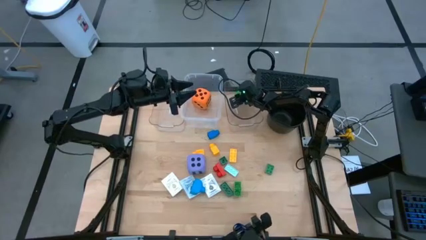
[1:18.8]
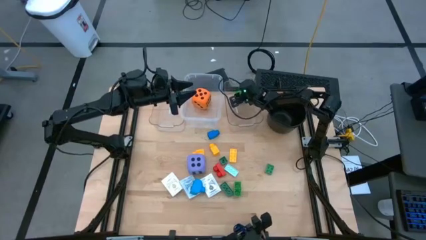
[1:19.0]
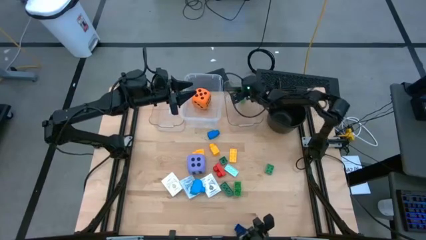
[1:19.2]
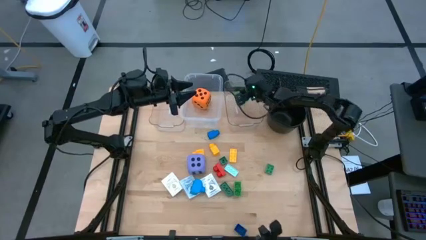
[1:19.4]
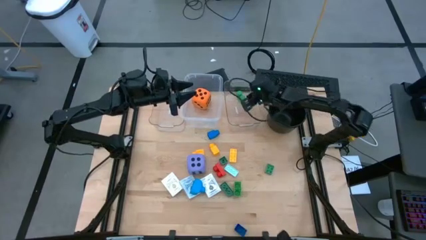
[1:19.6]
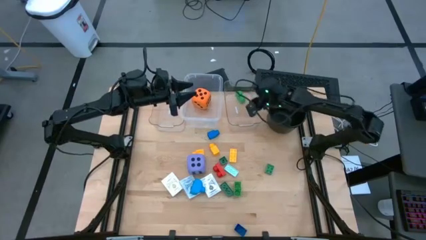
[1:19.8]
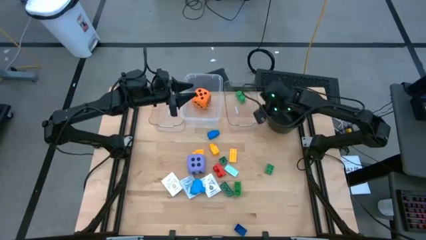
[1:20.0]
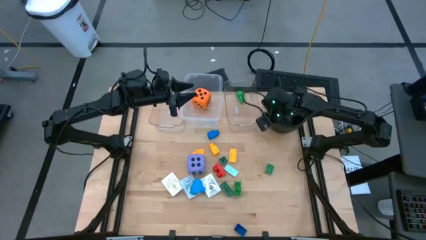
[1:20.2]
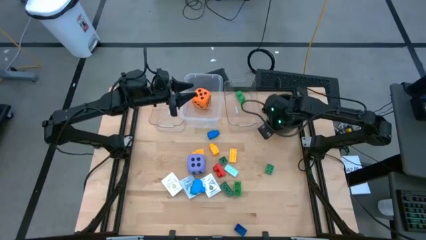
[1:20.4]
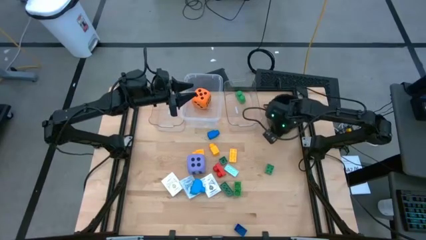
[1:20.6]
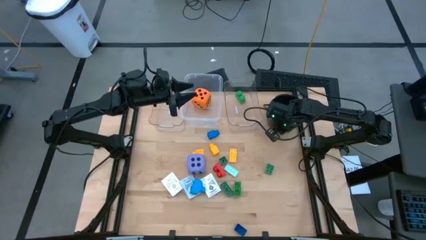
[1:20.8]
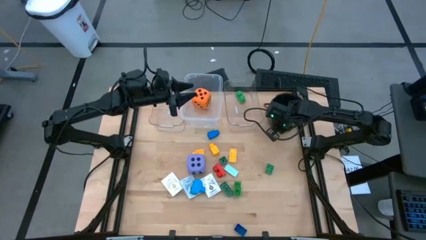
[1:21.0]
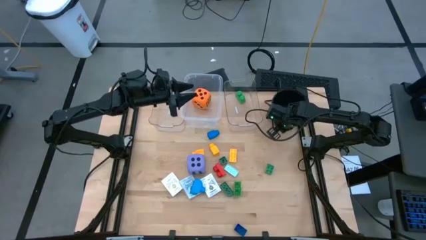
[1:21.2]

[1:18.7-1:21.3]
Task: Pick & Place Toys
Adjust the black bucket

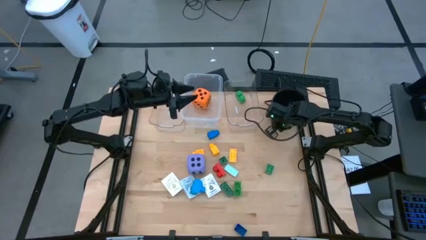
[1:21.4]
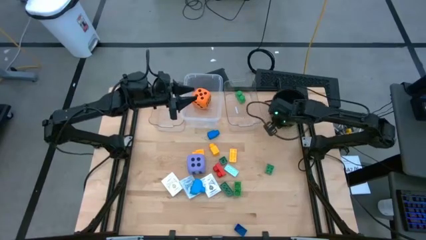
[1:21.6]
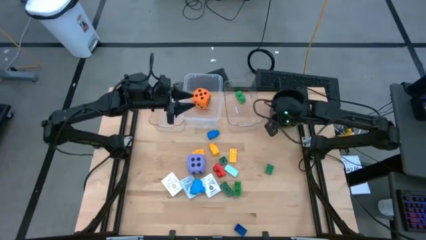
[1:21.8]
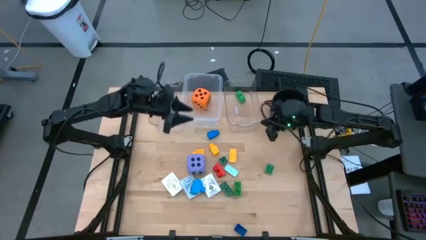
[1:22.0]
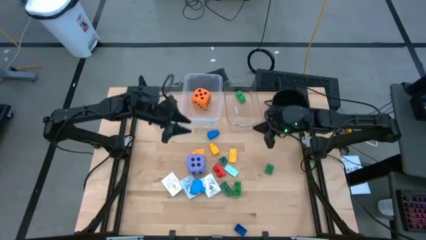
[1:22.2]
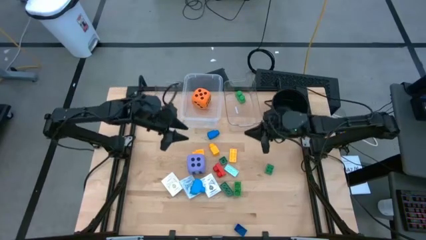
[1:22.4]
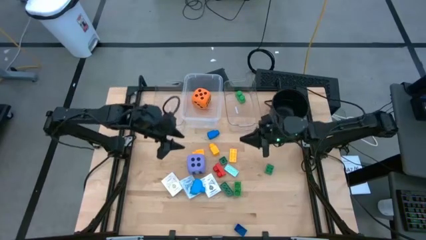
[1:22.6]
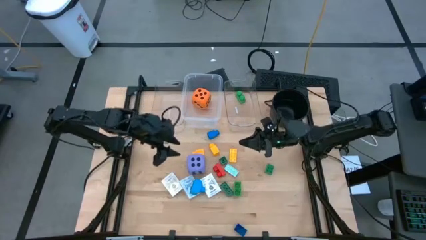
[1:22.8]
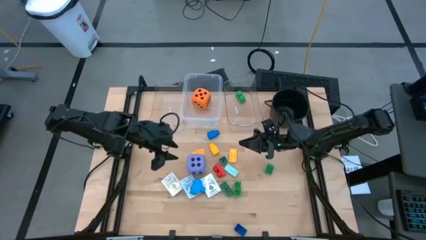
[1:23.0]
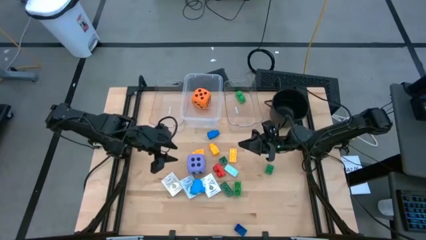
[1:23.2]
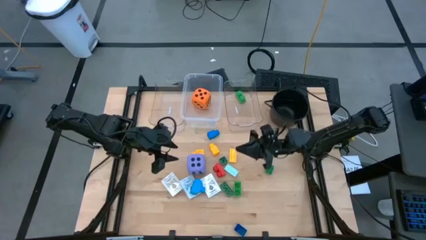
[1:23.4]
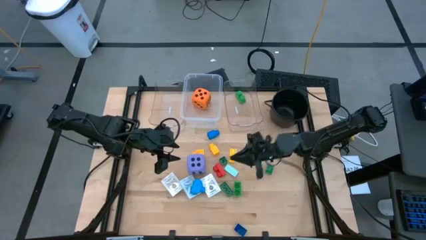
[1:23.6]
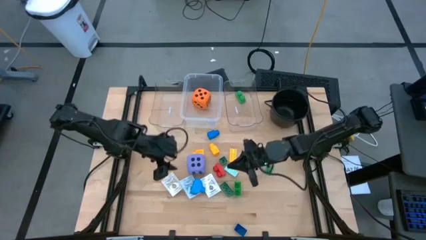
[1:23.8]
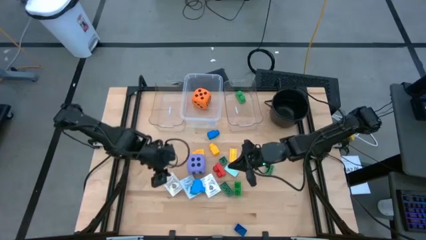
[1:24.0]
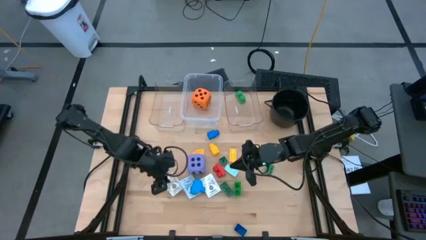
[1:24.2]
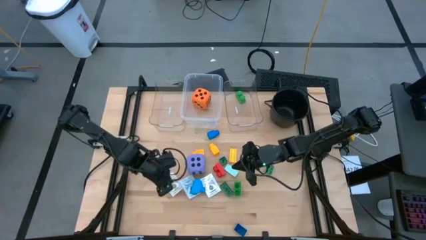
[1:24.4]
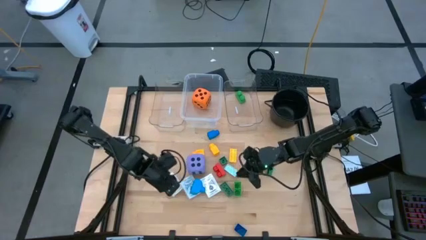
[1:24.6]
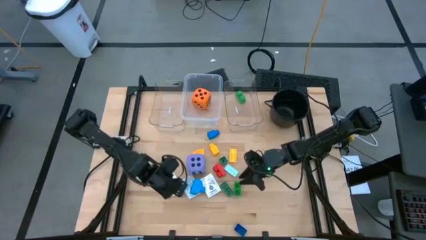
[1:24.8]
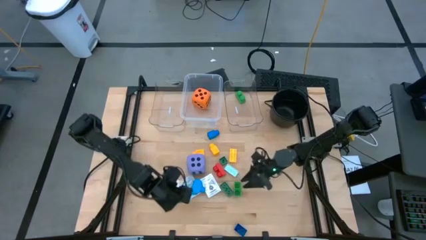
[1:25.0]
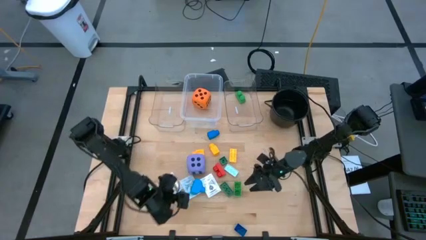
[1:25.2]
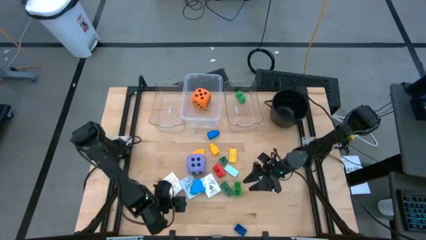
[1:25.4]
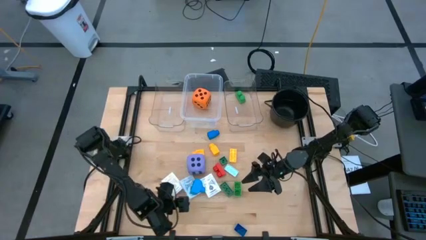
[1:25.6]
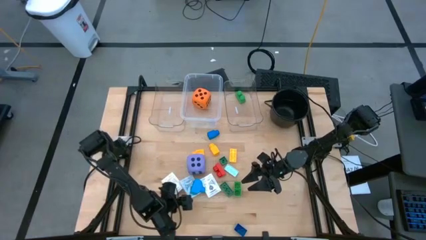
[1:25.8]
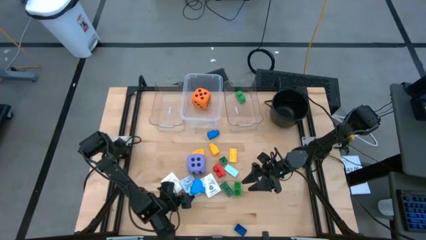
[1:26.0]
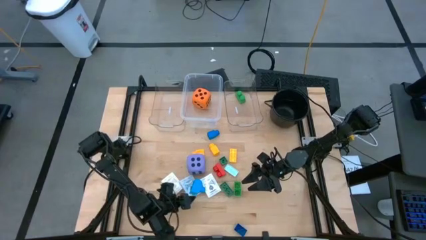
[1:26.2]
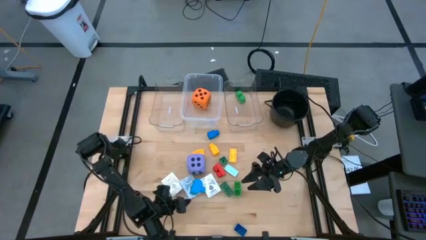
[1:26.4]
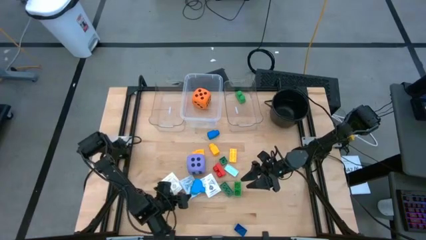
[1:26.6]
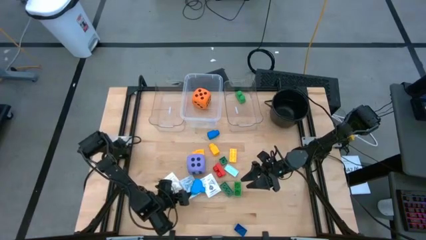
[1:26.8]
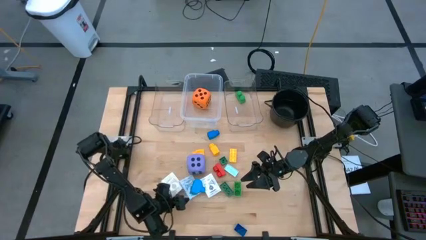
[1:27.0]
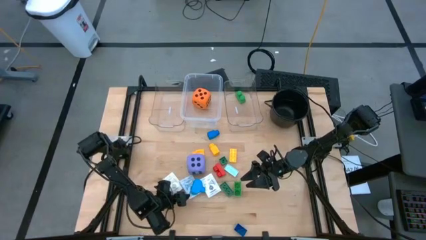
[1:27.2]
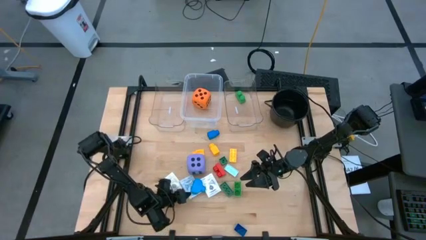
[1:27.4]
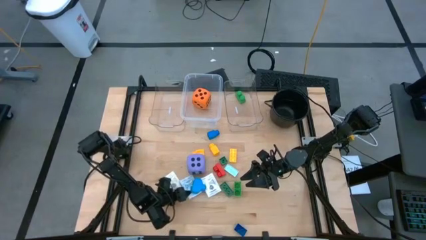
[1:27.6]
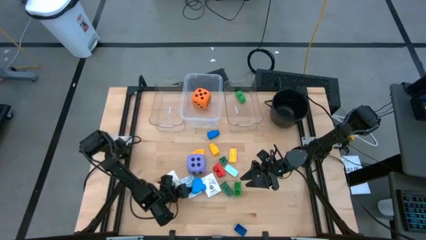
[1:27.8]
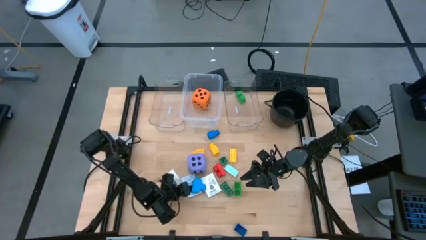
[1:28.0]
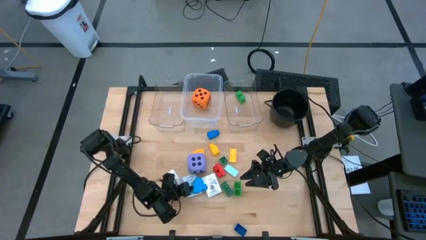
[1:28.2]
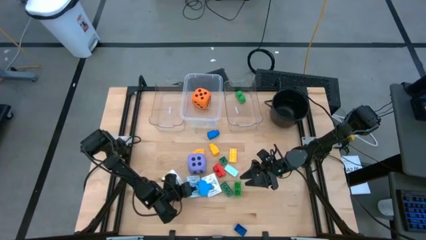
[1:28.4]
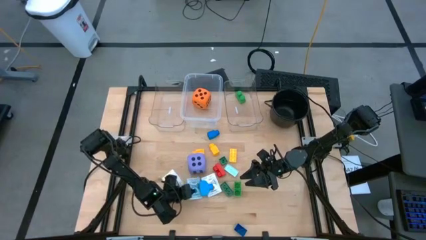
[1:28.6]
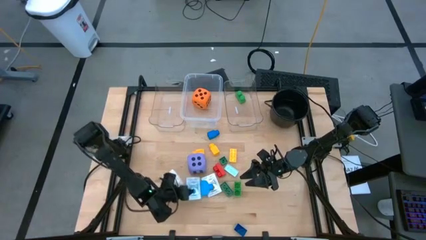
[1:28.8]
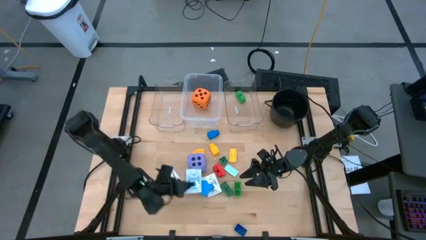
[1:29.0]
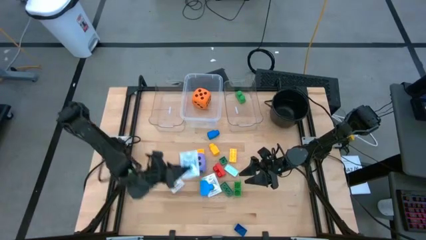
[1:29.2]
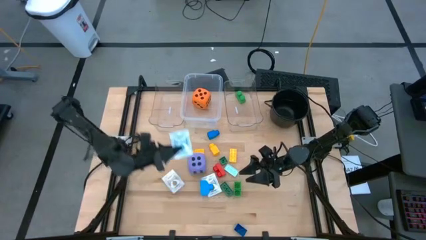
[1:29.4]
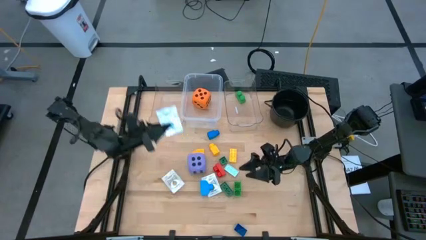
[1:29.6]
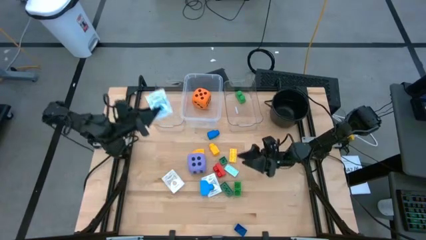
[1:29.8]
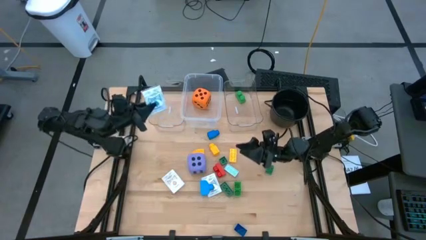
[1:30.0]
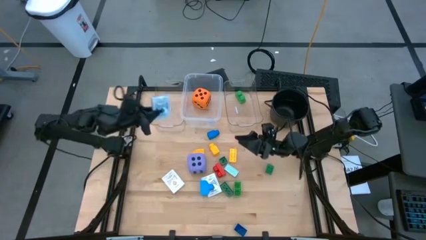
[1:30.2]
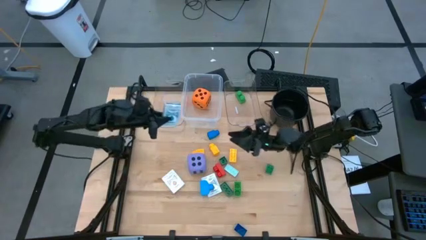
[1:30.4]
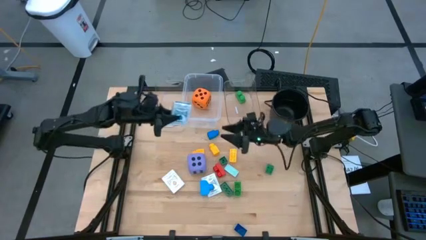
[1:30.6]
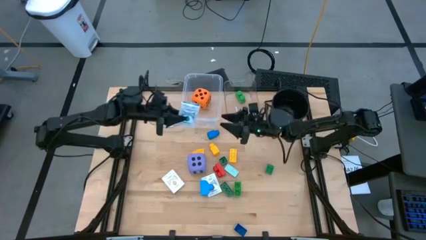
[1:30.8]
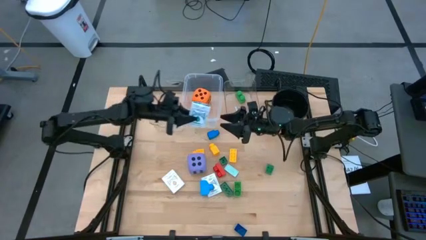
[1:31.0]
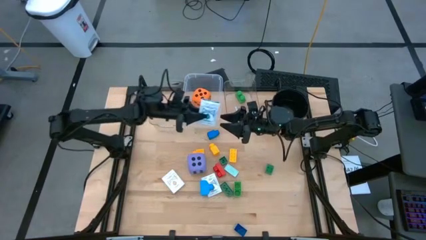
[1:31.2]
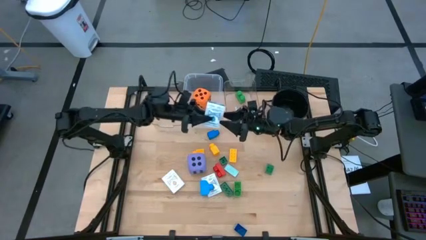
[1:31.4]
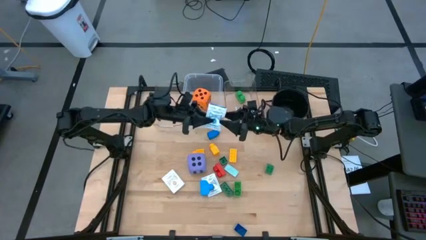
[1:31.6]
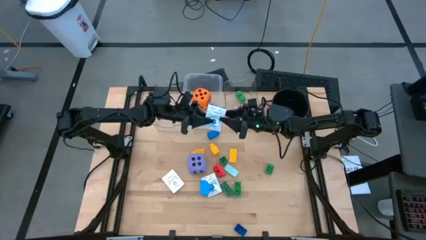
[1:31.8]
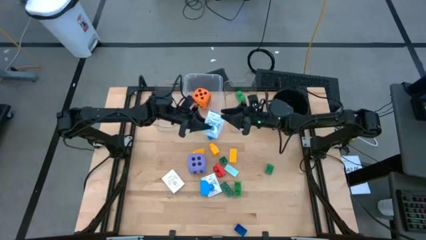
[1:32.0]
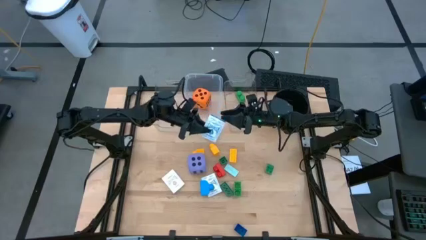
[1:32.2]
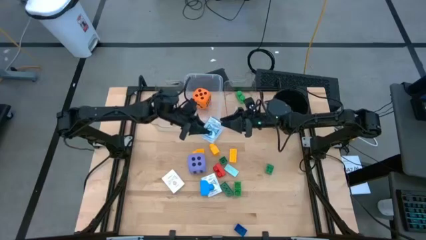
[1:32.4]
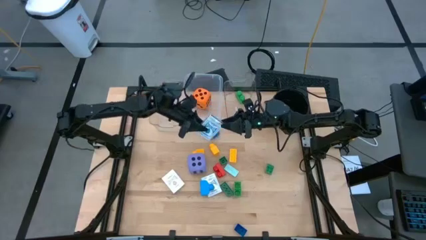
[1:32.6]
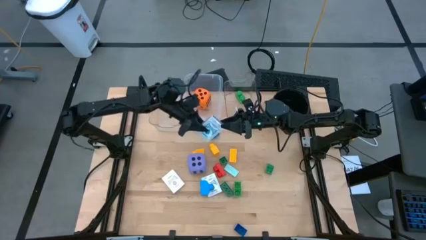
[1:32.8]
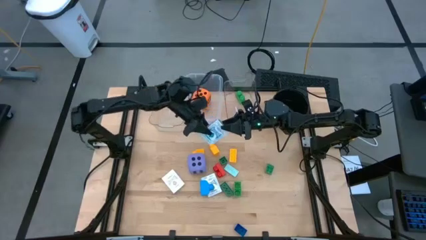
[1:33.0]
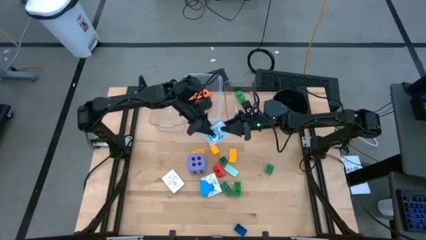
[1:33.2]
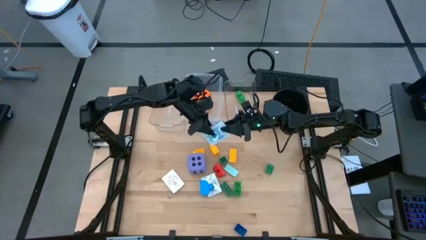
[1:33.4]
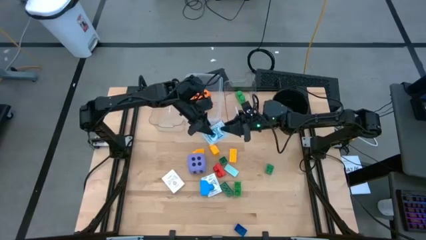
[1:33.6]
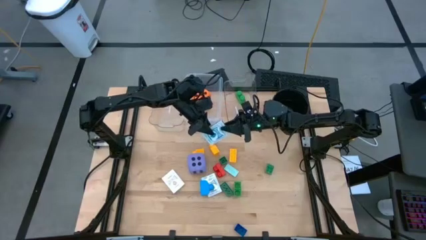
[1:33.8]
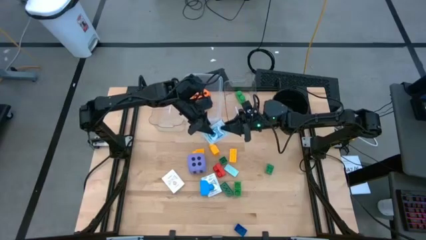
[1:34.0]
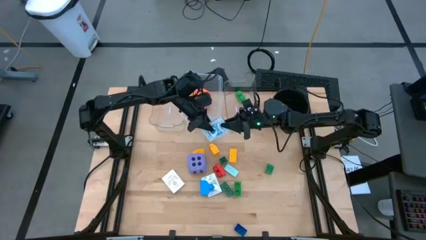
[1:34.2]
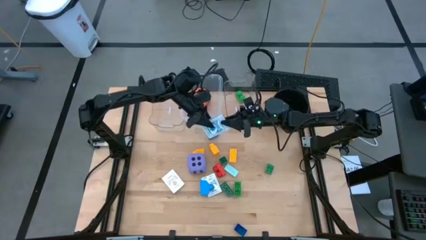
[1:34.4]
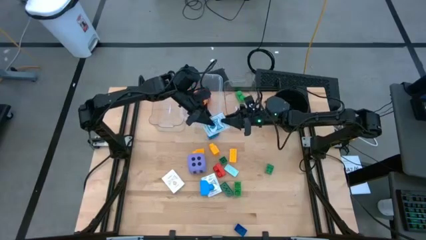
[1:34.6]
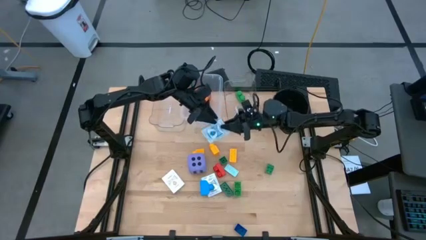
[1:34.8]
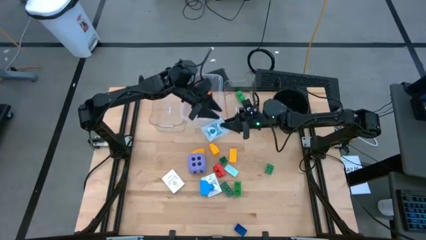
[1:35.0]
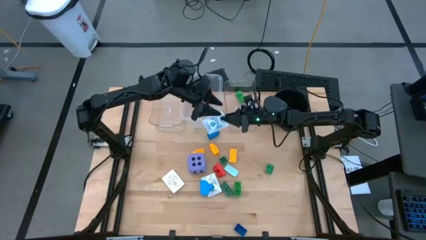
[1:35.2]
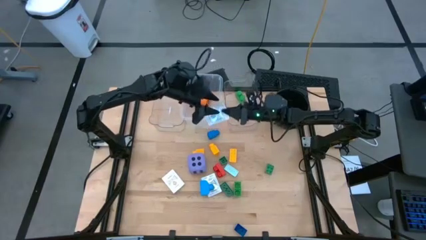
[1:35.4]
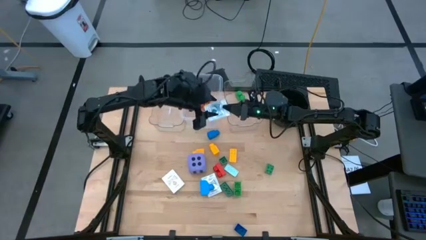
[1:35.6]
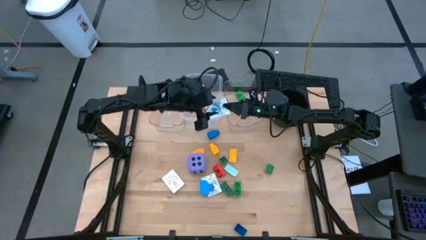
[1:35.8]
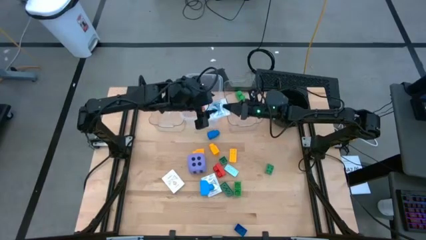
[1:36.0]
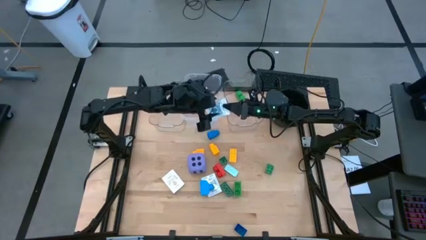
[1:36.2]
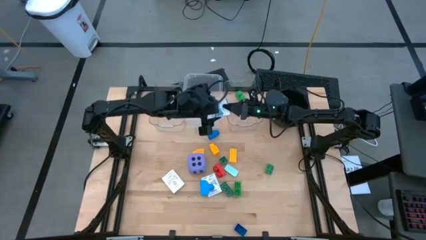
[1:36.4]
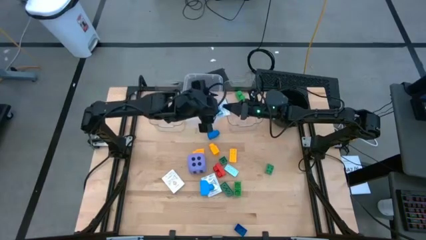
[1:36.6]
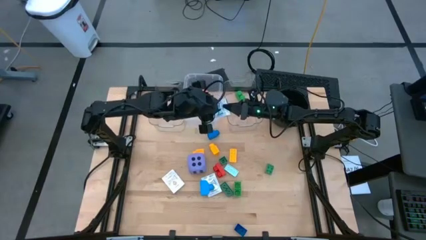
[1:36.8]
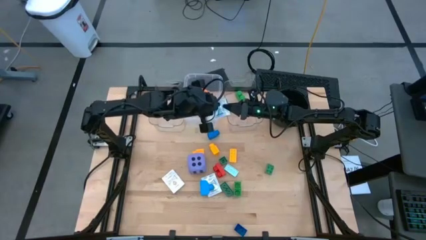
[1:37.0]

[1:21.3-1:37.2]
Put the blue deck of cards into the left transparent bin
